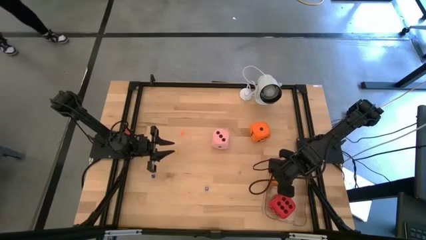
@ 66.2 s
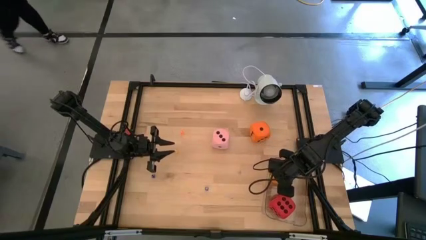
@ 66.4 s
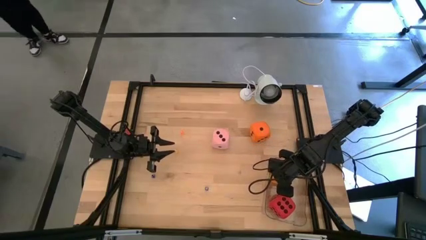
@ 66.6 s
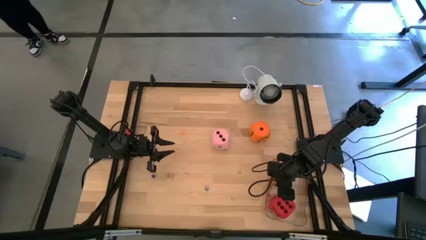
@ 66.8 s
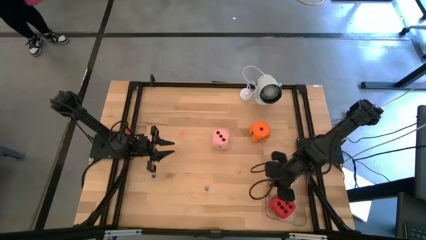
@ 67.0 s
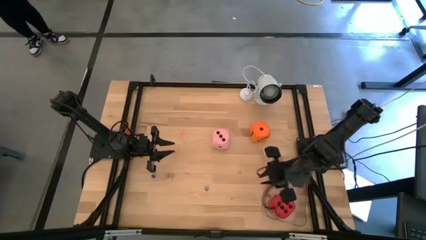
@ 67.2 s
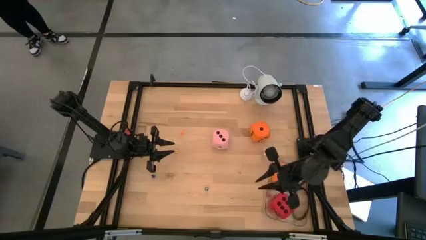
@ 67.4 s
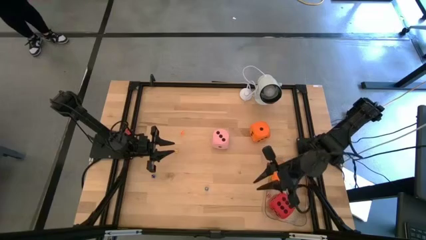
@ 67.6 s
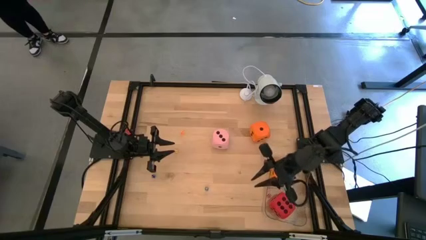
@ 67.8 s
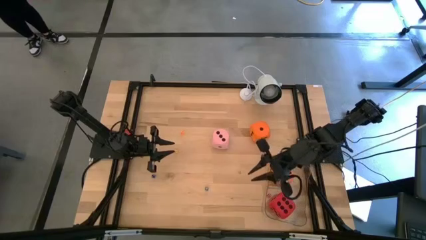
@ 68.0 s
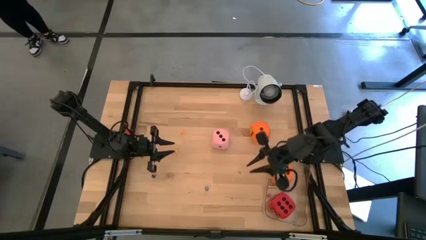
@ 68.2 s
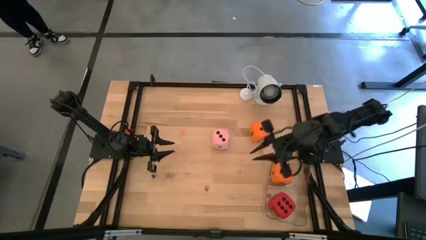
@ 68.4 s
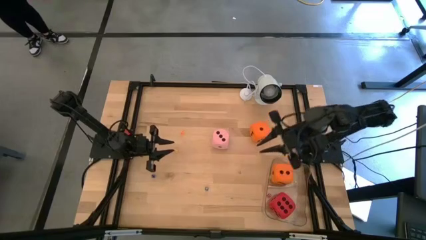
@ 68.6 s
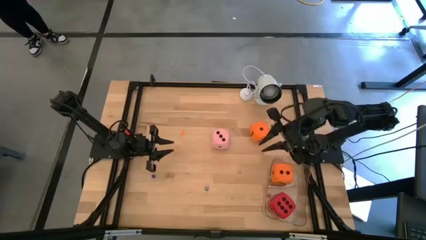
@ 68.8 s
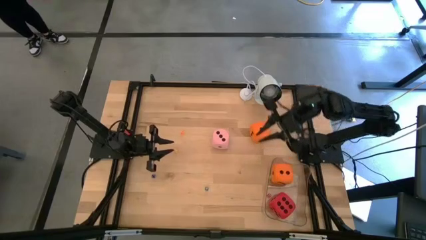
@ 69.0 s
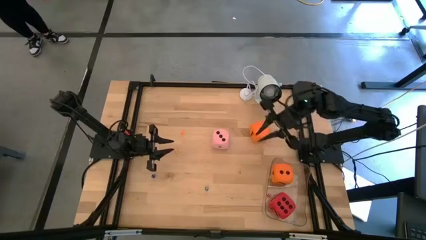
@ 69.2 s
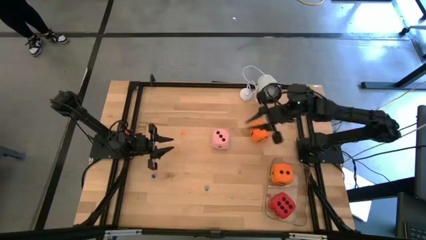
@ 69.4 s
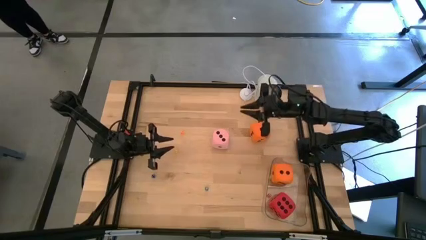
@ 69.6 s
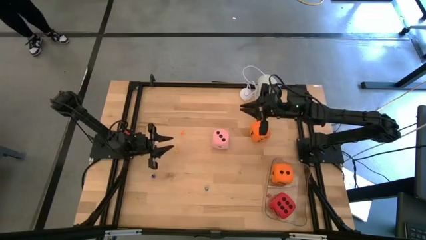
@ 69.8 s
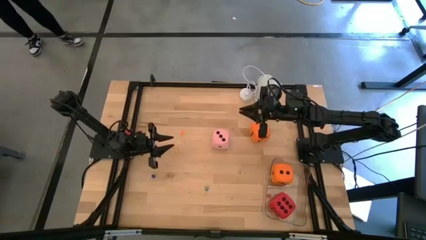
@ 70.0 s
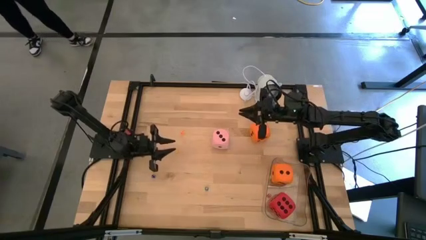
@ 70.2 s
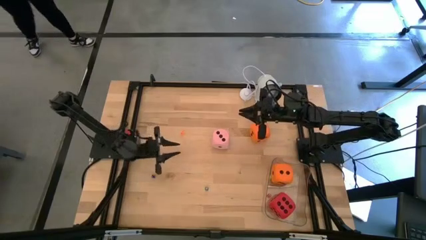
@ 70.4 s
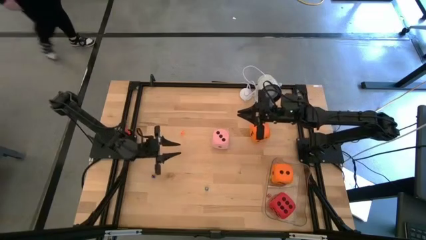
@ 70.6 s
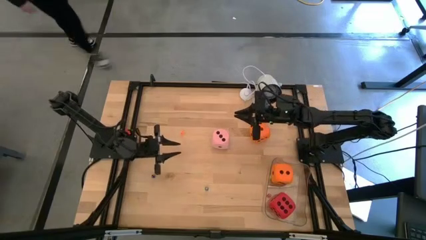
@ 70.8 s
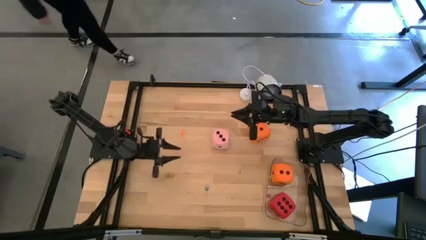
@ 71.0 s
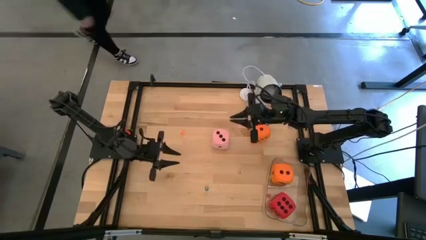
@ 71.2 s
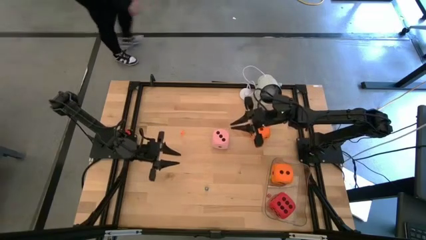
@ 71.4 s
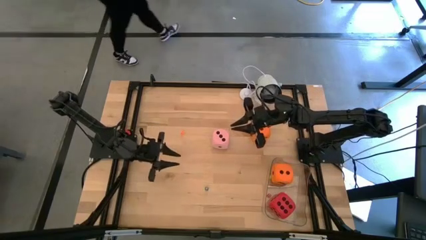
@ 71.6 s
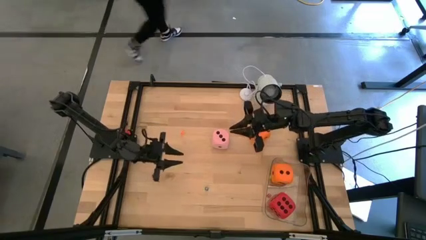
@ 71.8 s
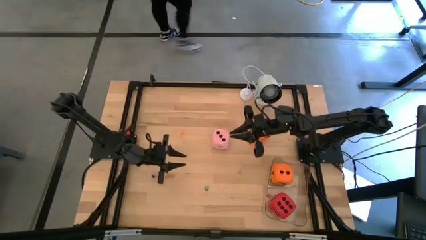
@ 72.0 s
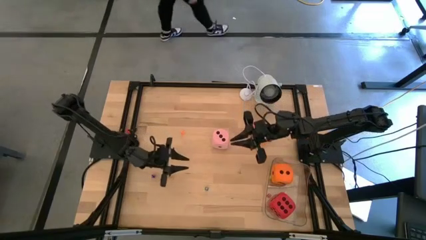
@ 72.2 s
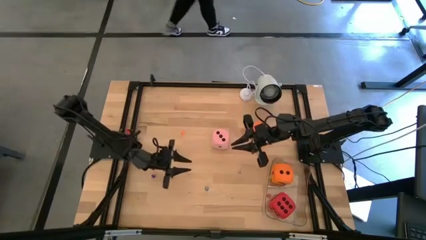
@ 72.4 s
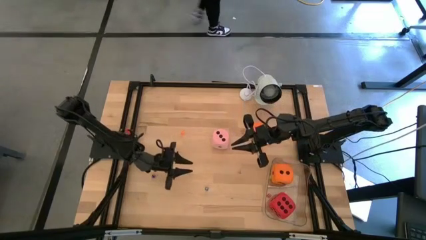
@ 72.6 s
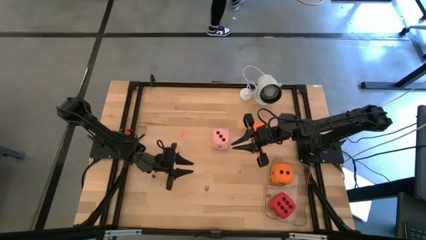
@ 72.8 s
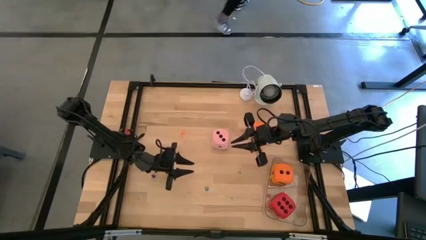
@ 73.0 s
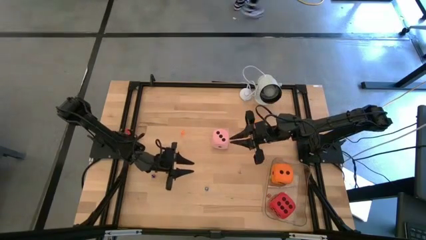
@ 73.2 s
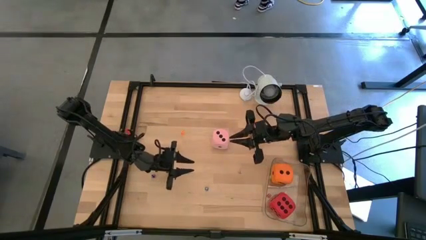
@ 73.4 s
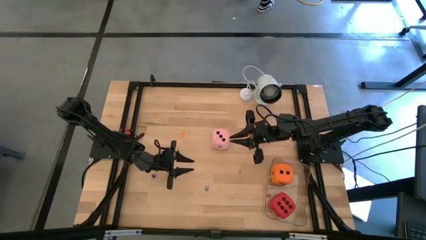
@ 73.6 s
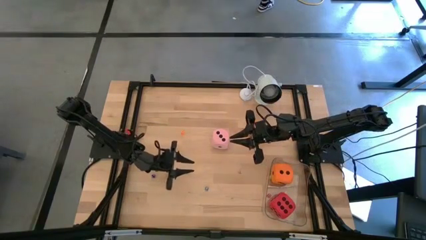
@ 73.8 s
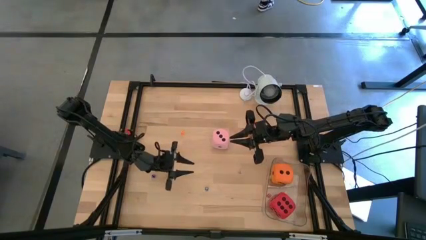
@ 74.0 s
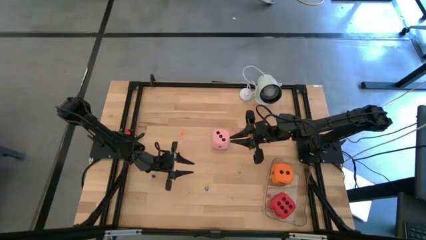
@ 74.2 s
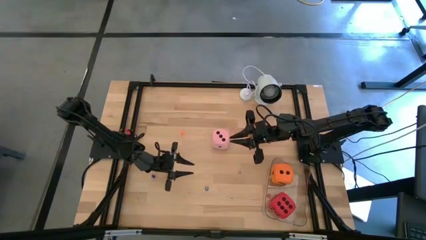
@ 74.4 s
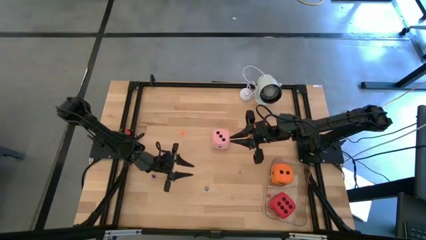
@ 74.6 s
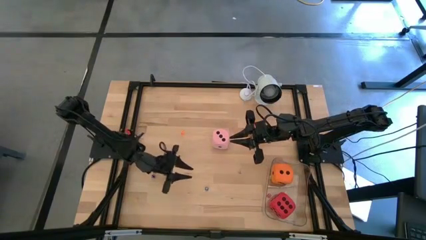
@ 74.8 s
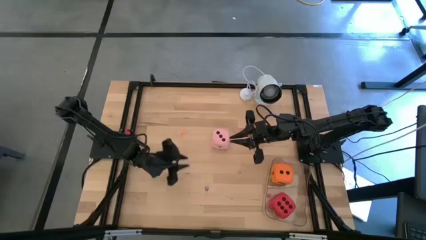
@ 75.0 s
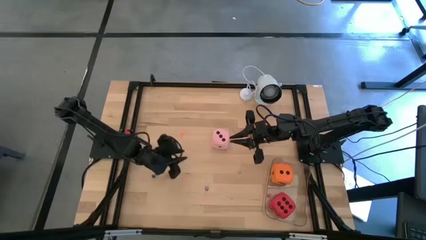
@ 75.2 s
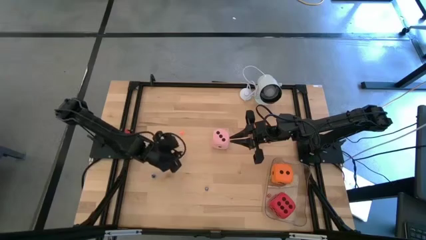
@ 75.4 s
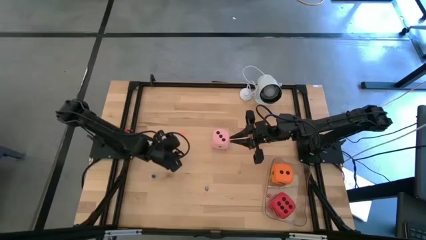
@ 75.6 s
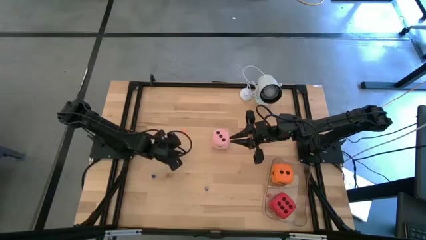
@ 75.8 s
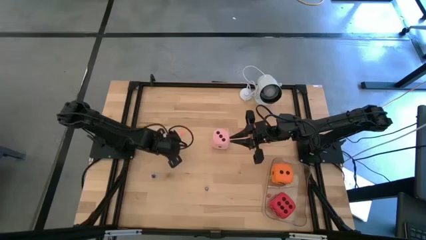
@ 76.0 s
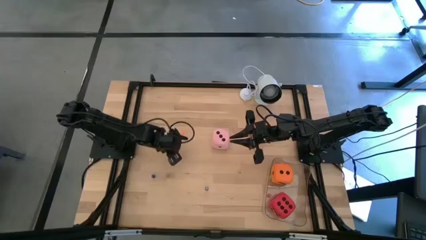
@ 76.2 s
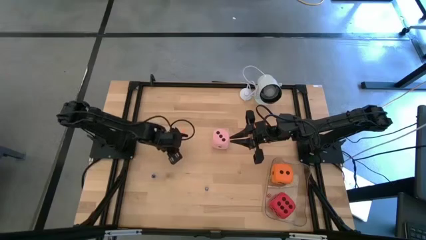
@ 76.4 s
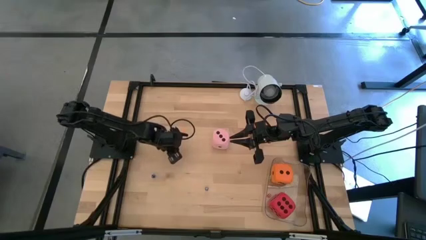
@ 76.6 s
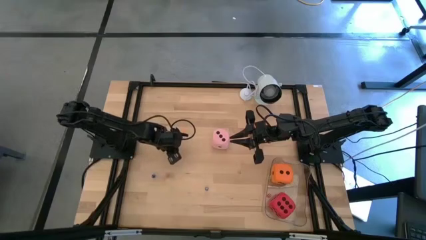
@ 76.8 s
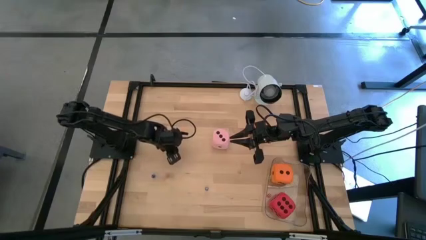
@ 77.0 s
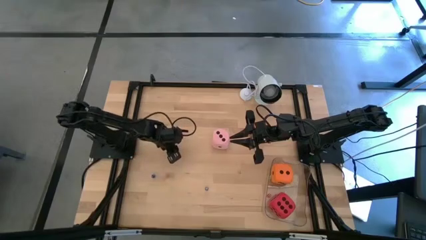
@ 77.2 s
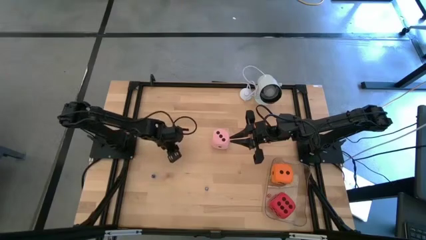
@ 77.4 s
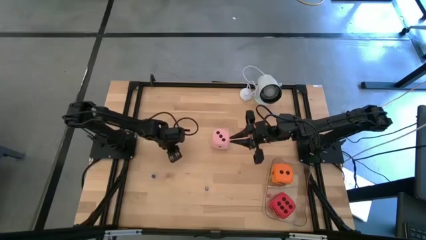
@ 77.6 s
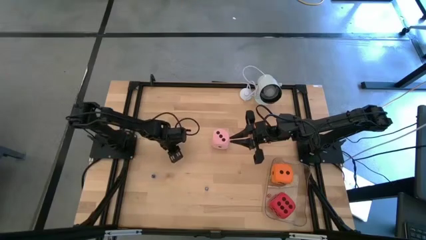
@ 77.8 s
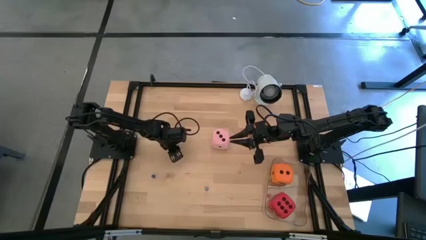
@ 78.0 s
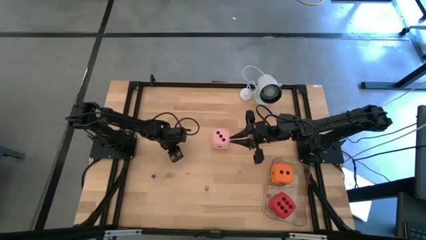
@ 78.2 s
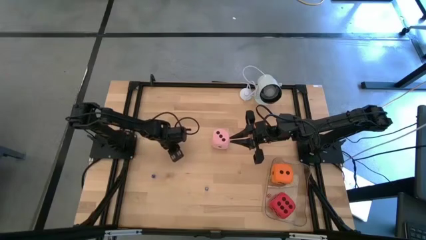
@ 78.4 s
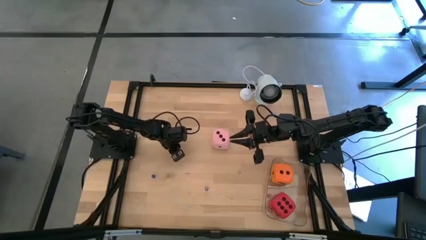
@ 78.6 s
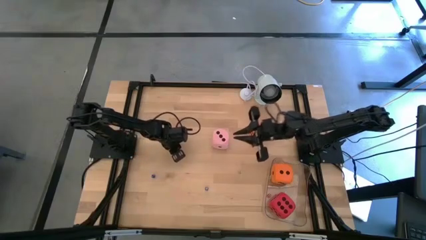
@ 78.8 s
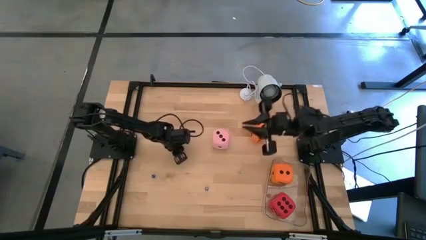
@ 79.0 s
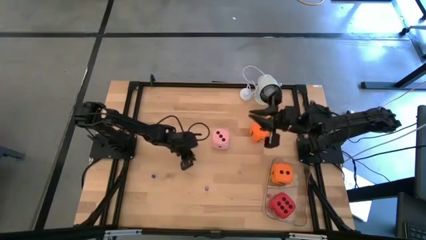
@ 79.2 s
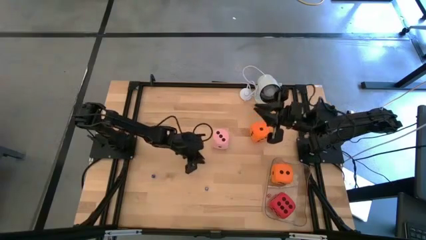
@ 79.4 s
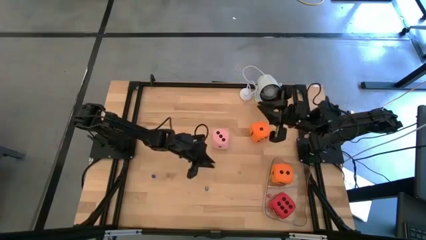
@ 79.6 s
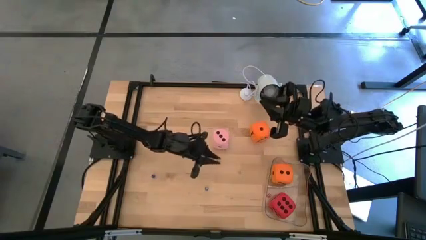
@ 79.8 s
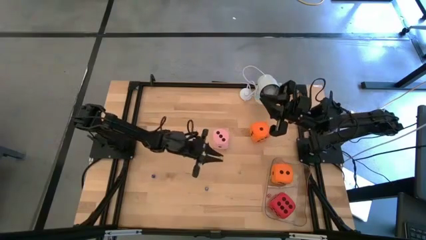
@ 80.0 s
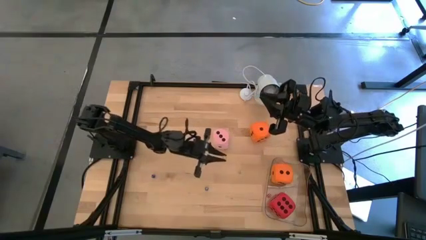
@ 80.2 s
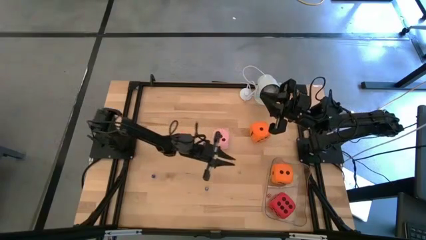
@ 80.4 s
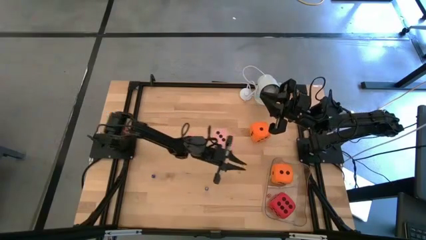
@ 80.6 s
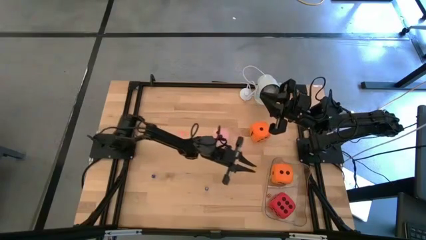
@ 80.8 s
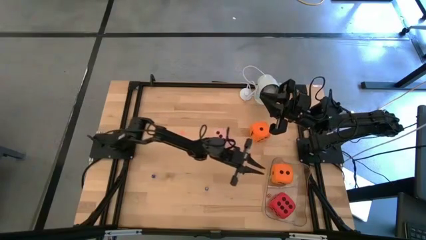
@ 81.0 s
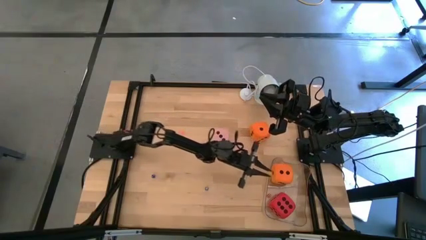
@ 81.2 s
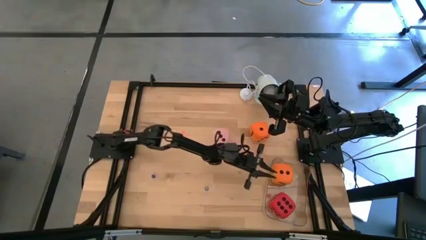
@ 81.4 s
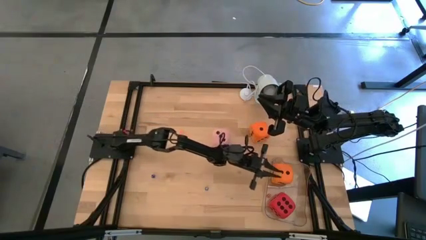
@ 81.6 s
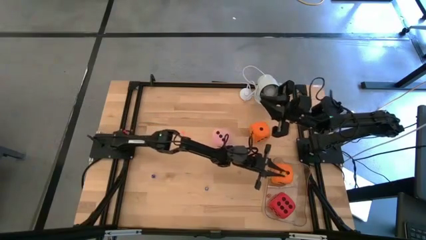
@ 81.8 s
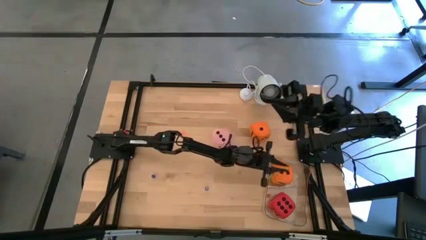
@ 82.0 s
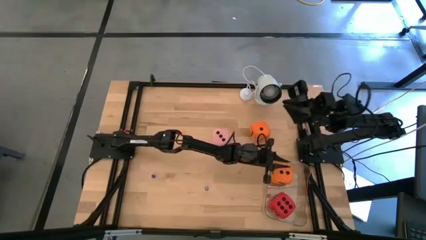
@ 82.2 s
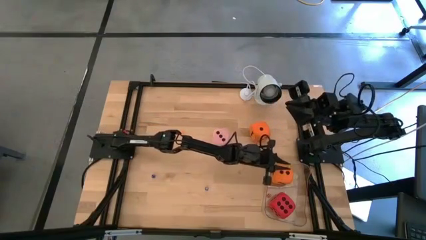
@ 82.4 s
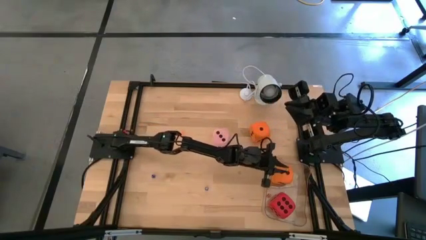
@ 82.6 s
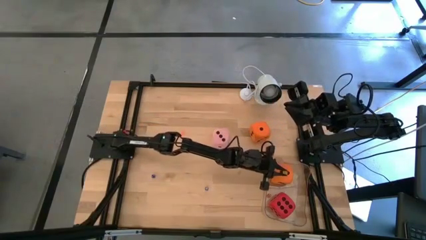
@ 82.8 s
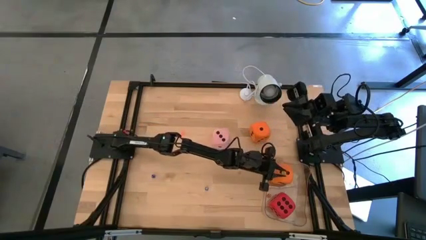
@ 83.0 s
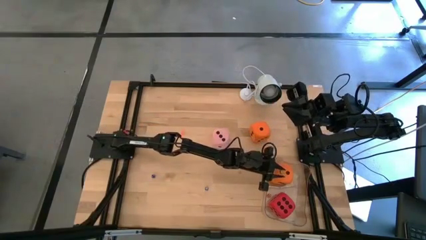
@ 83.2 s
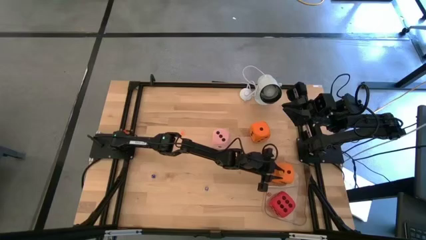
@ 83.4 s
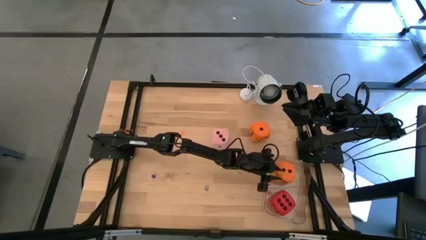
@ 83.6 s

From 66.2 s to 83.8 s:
Task: Pick & Place Dice
Put the small yellow die into the transparent container
